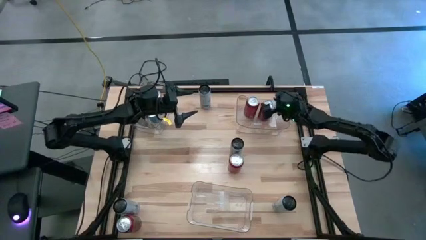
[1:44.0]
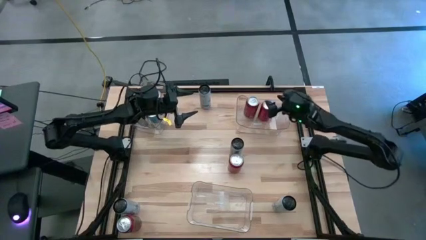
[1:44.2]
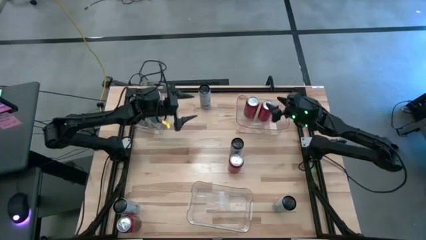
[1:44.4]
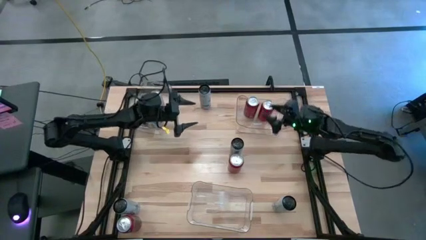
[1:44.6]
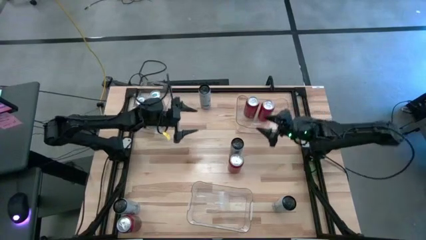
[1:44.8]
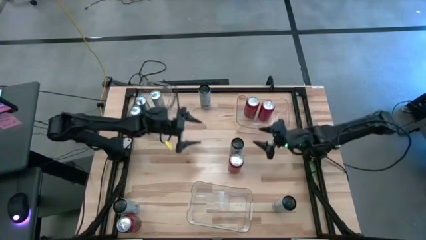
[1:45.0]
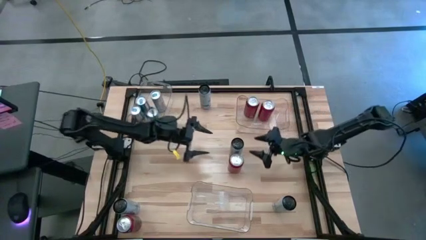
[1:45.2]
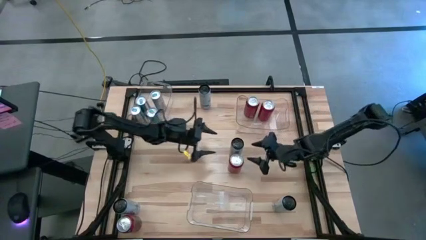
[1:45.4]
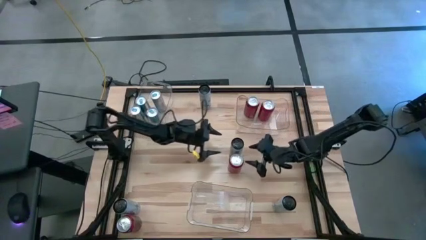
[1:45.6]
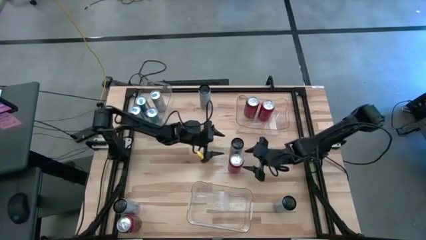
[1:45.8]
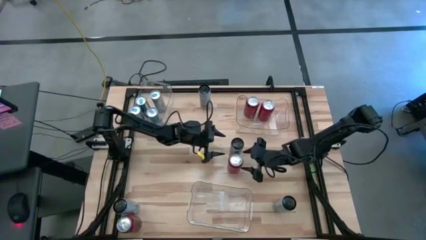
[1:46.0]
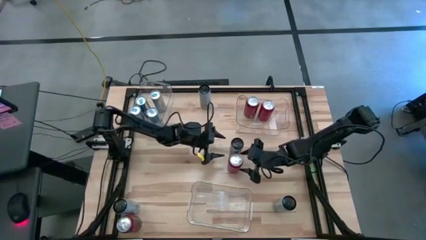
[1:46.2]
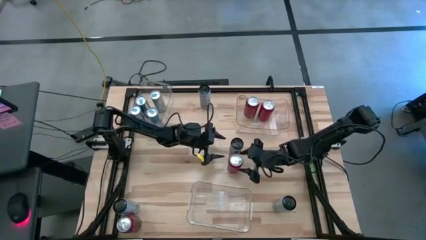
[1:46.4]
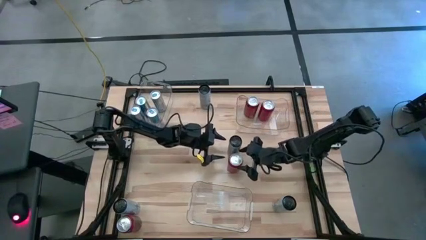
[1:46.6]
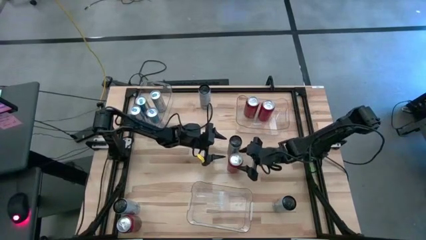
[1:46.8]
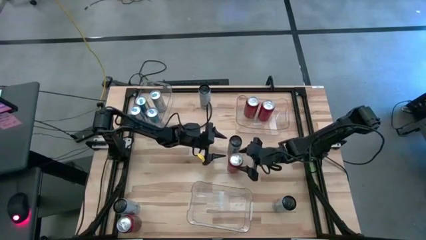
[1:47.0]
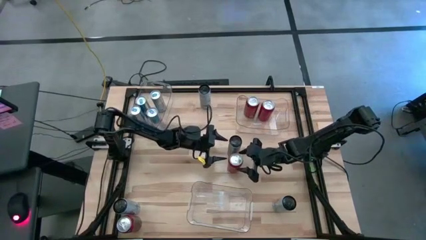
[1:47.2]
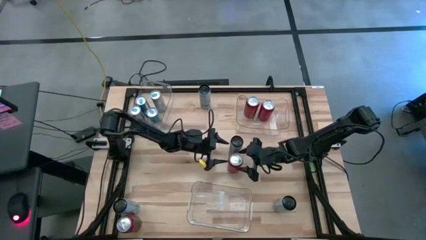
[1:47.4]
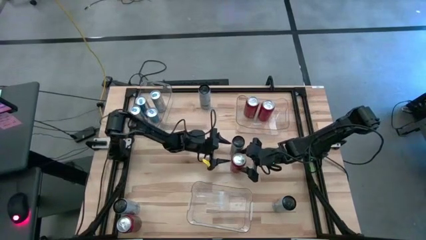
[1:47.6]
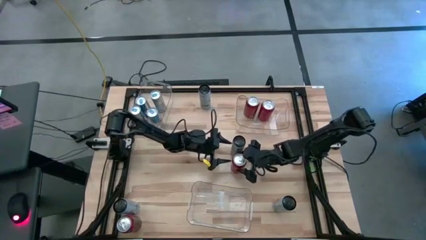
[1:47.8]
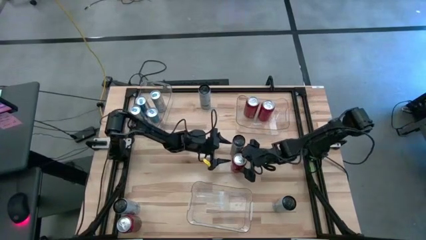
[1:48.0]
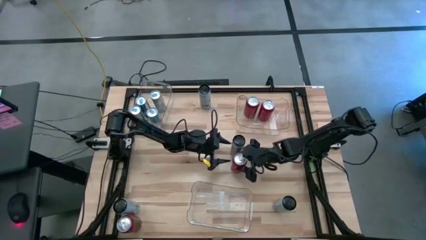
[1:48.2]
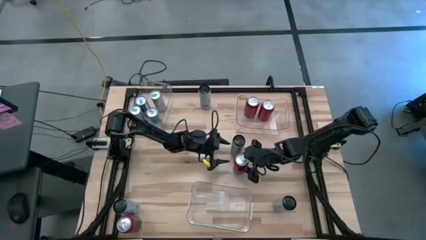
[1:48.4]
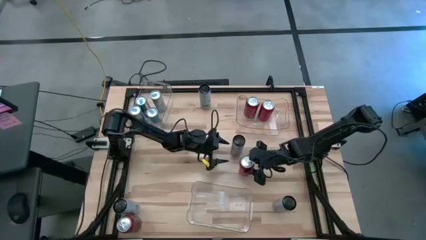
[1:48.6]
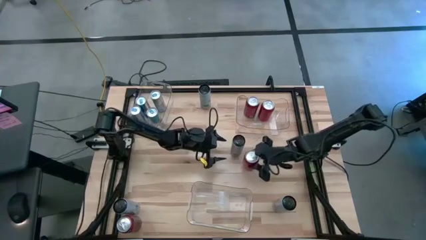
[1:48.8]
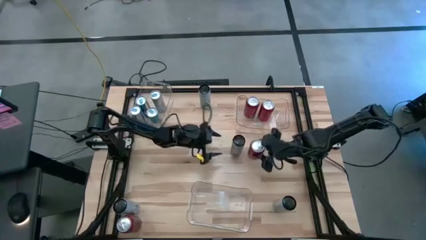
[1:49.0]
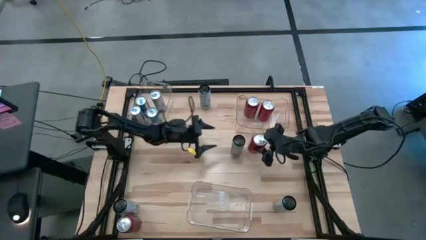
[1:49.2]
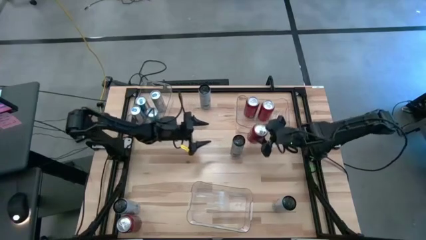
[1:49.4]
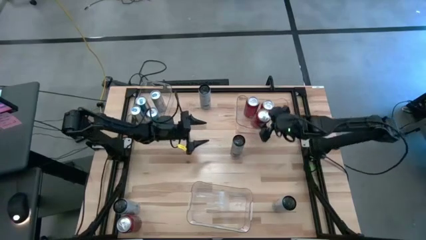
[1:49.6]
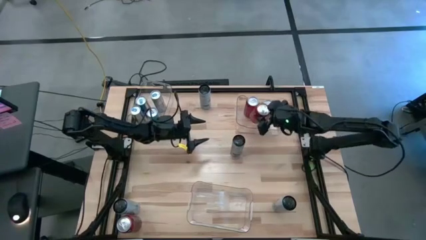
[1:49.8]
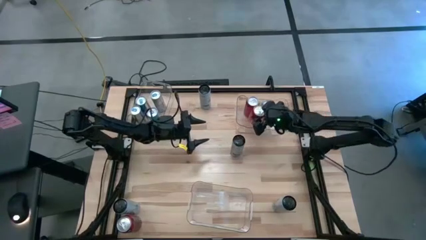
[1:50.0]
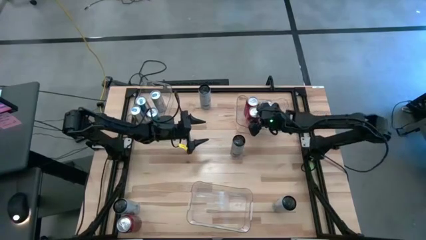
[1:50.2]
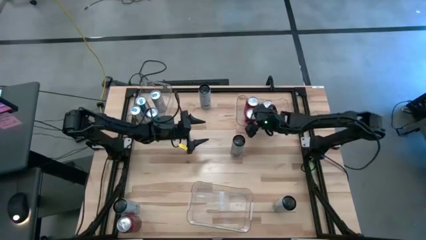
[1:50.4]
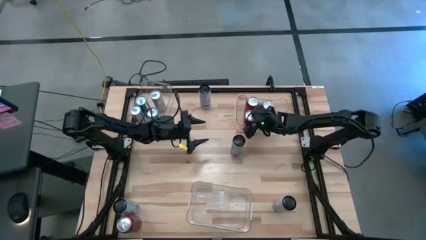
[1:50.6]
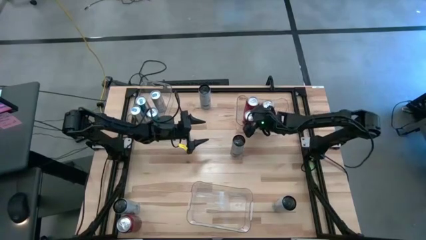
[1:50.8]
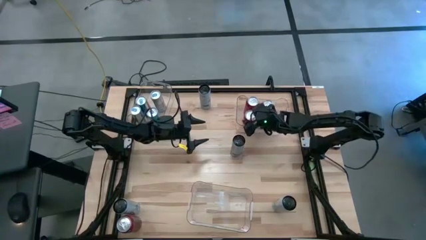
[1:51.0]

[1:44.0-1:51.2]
Task: Sort soda cans
Put the red soda can into the top right transparent bin

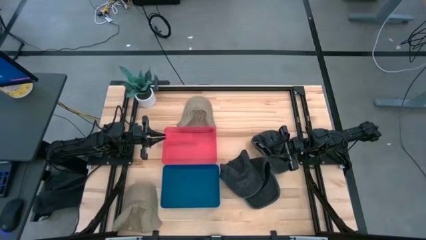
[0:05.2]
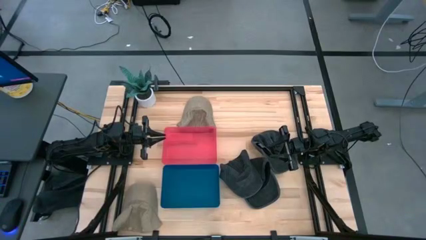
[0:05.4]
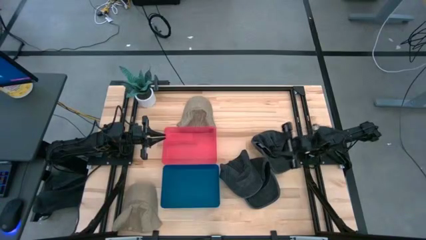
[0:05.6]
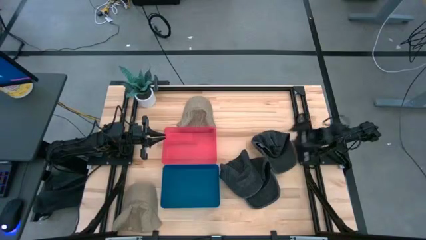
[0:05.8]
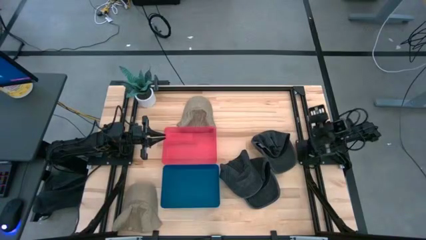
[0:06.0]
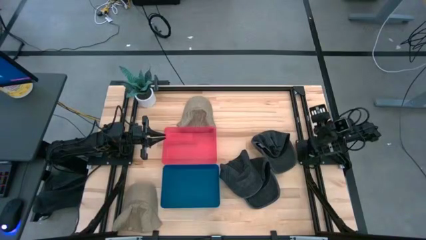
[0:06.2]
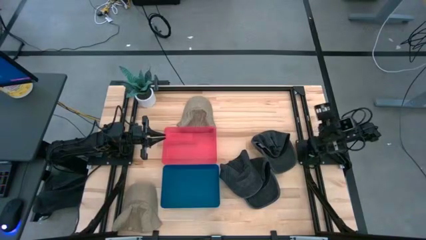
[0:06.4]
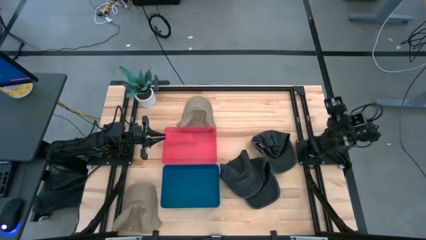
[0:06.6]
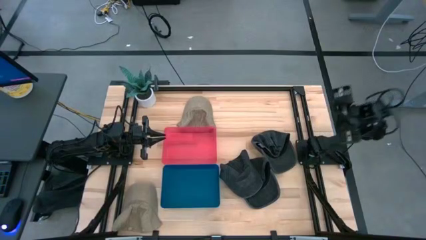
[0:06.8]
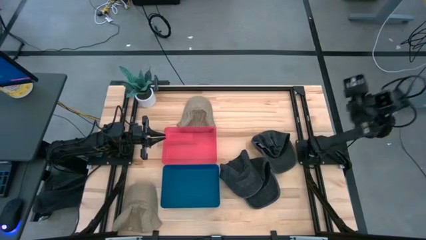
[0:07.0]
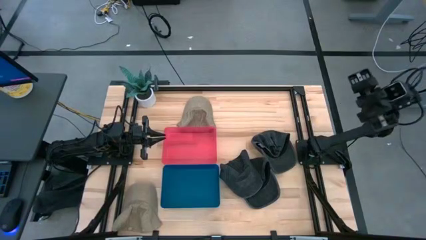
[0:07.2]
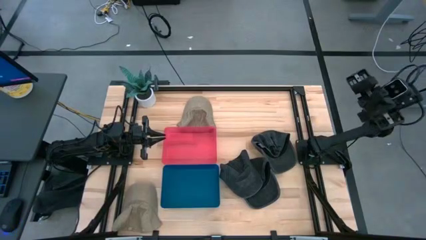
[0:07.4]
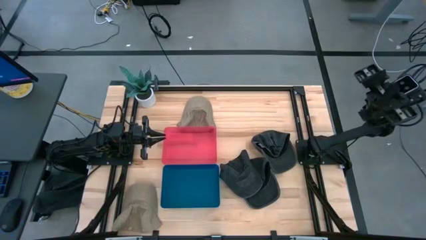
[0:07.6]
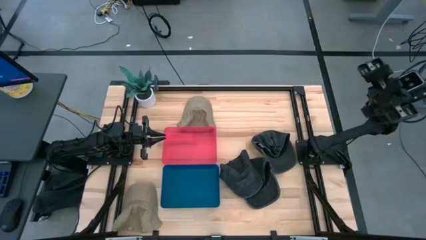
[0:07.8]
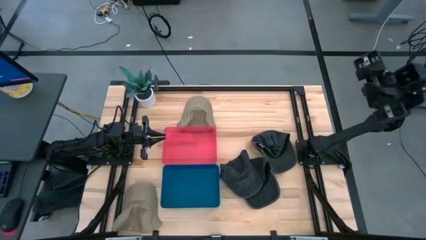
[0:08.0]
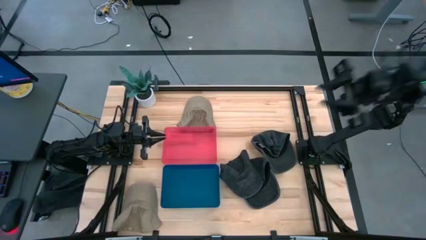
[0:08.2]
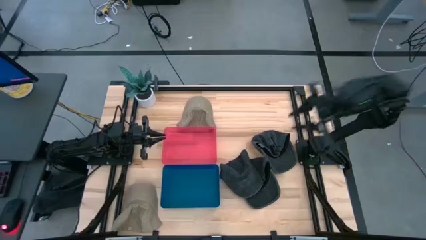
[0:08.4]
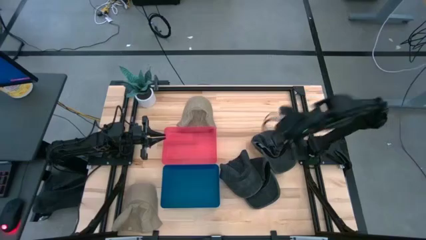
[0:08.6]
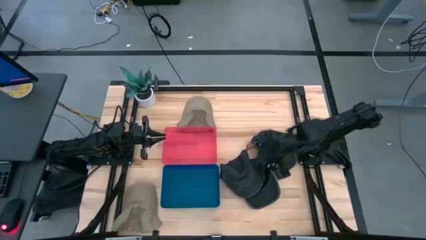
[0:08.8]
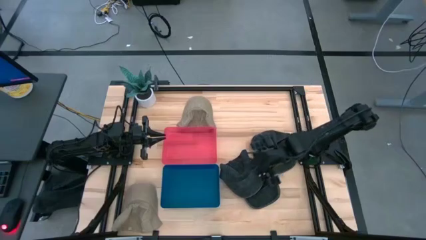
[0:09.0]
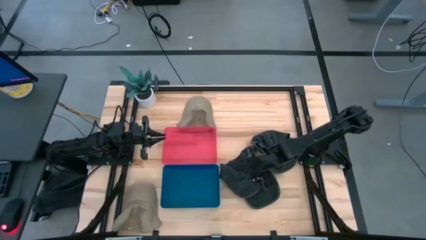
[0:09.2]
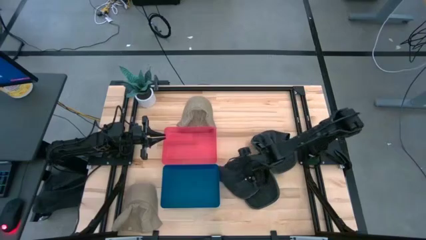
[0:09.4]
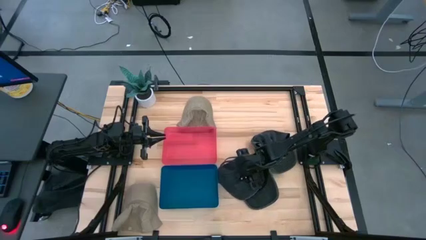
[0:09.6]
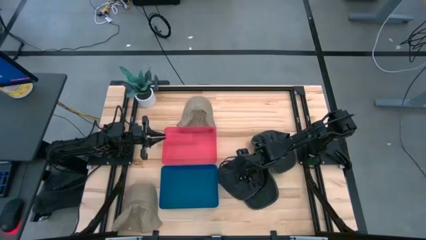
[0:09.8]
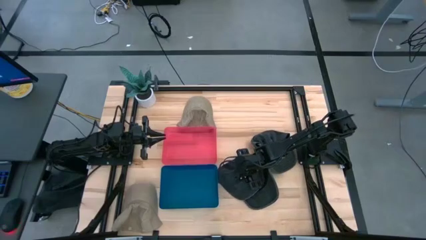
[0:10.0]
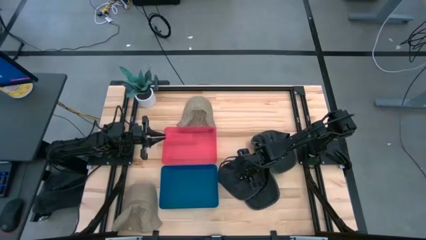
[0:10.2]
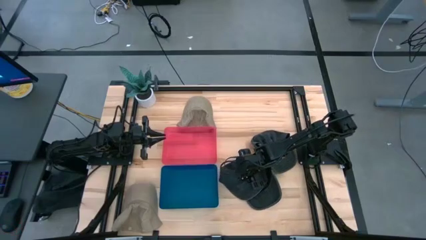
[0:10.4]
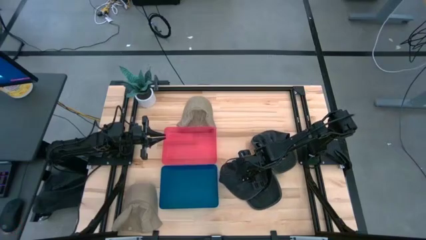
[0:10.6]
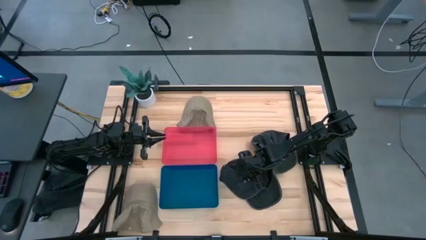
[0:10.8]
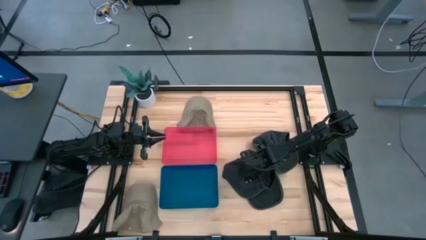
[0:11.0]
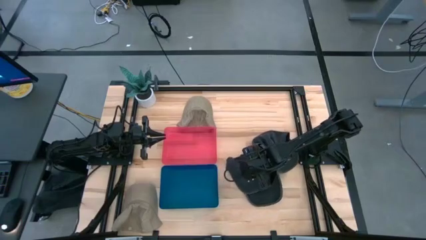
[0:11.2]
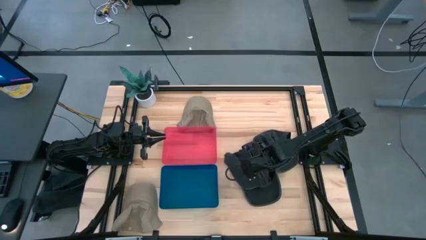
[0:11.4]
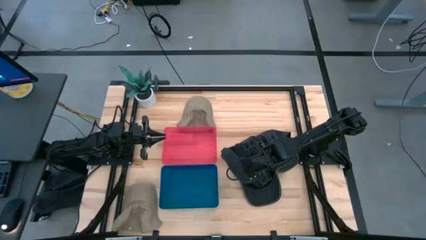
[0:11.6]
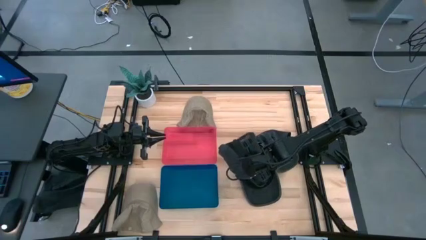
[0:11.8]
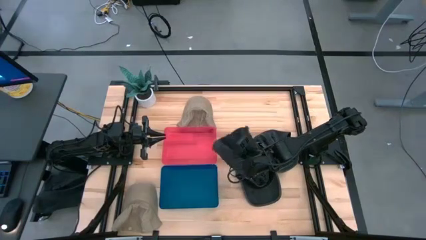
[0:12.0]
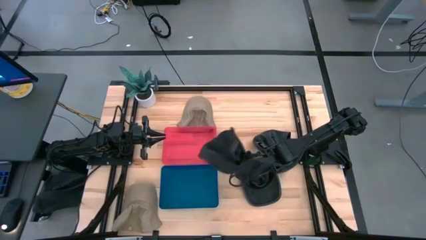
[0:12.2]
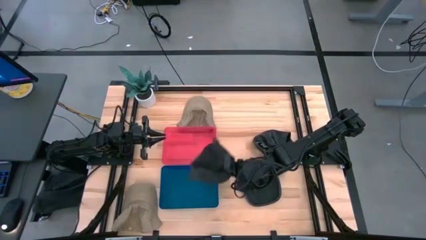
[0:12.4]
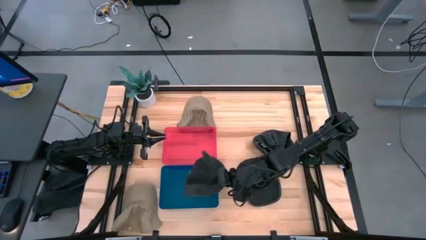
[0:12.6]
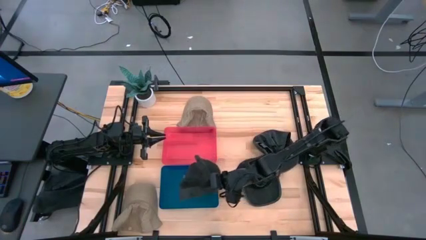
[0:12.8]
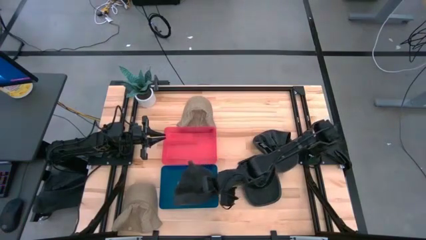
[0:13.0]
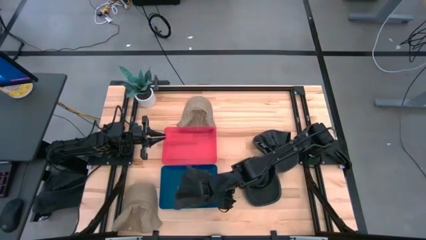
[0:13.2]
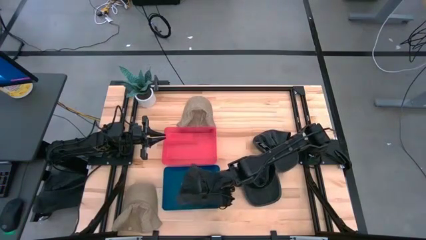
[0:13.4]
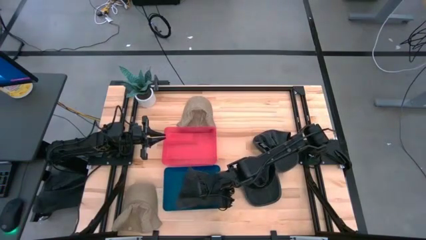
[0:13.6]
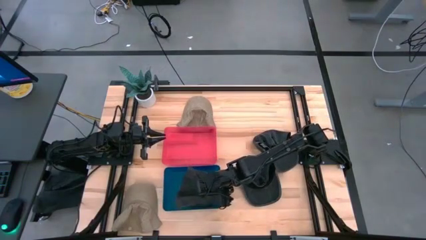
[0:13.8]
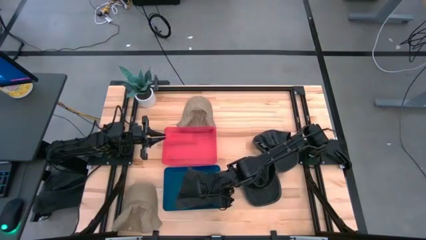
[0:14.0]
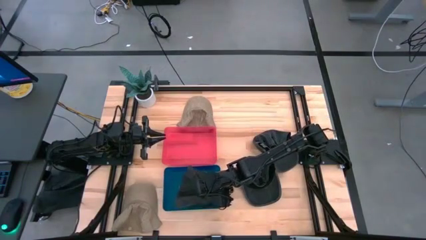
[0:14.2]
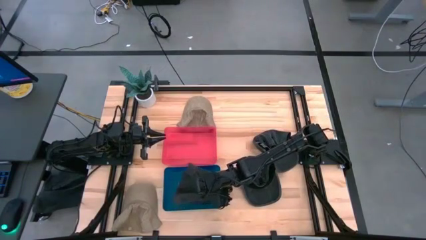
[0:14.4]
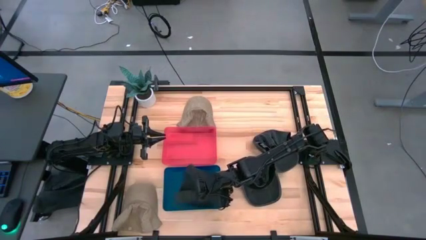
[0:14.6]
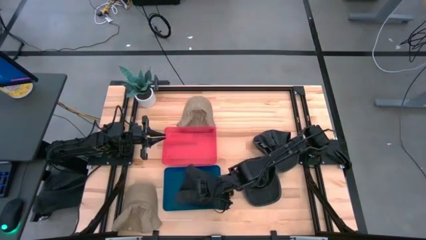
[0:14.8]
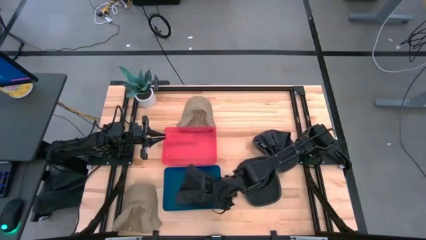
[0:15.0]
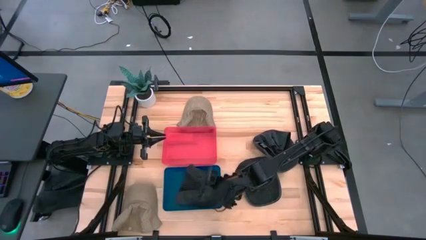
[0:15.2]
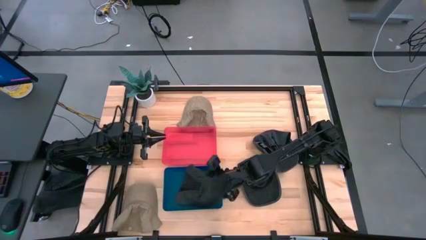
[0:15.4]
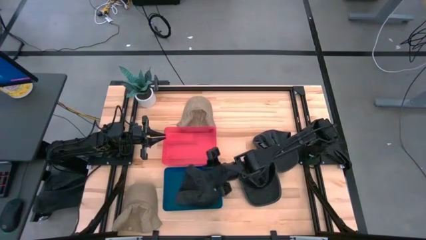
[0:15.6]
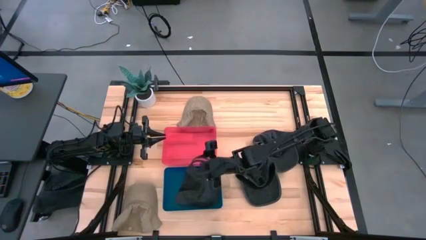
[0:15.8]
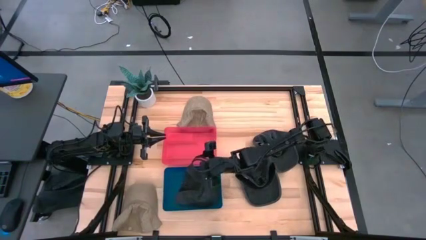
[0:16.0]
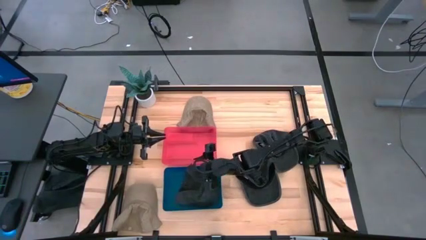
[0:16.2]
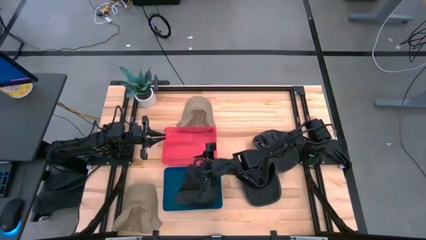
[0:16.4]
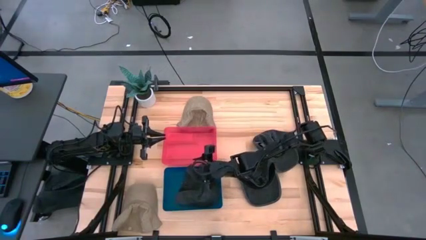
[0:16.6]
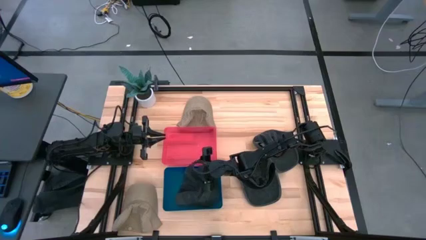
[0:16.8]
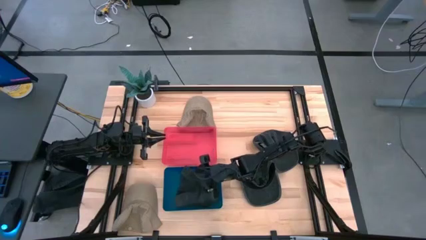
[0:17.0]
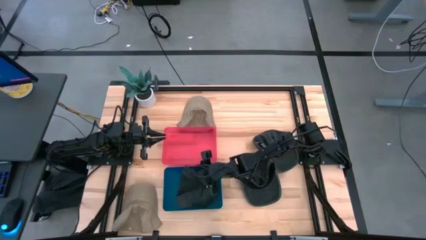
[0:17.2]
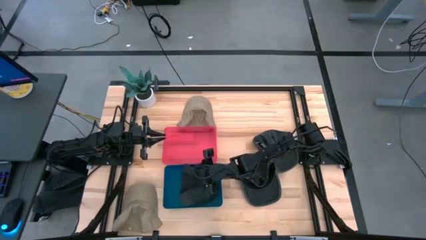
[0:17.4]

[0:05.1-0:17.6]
Task: Pick & Place hat
Put the bottom left black cap into the blue bin
